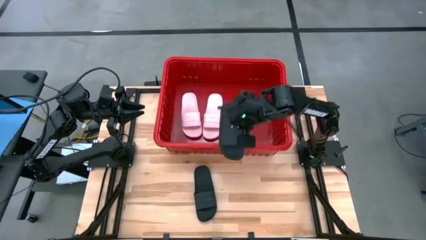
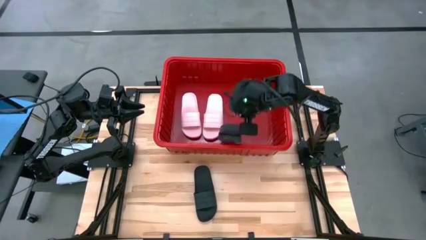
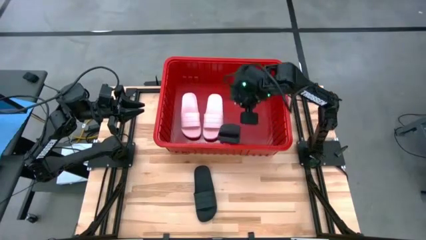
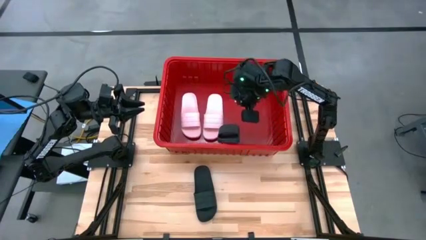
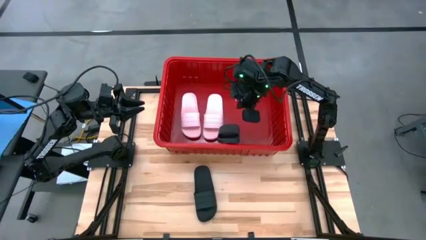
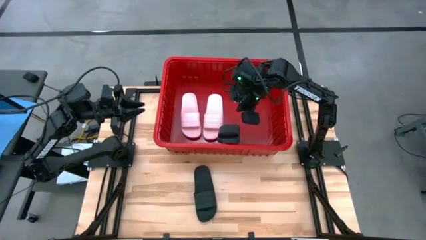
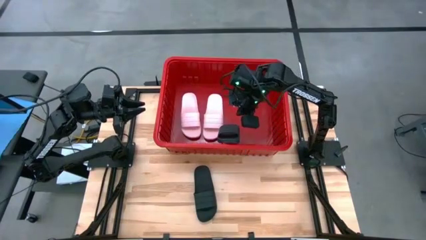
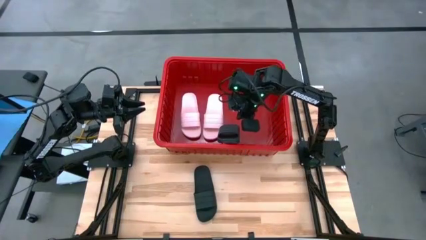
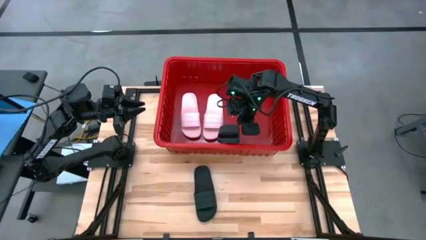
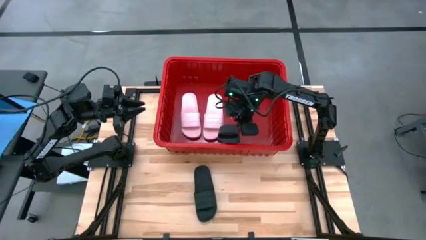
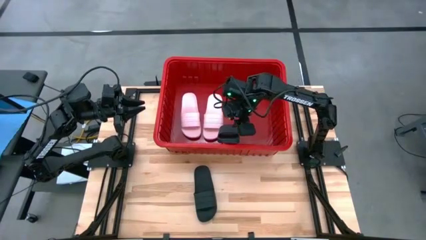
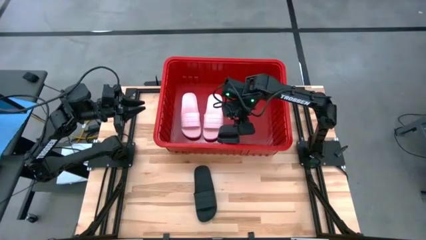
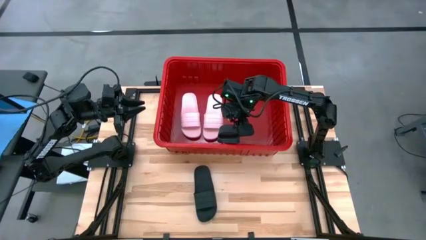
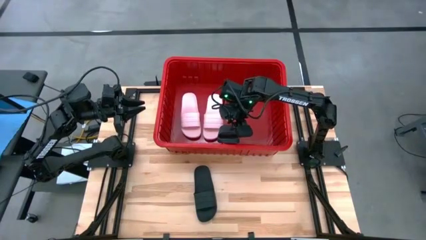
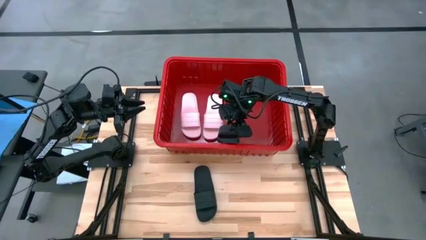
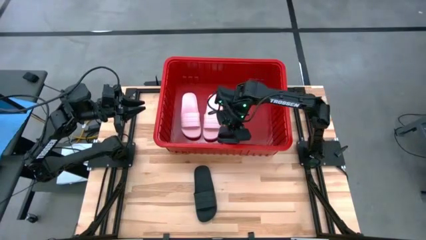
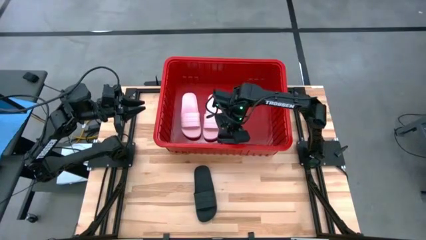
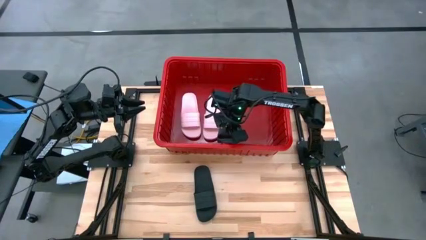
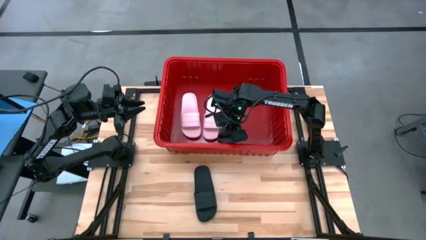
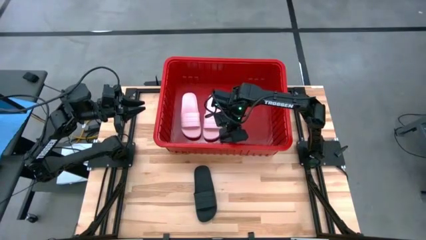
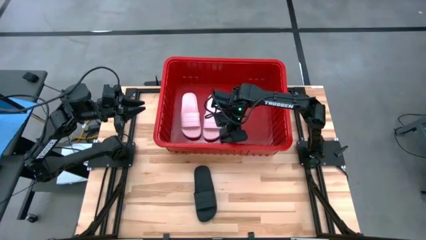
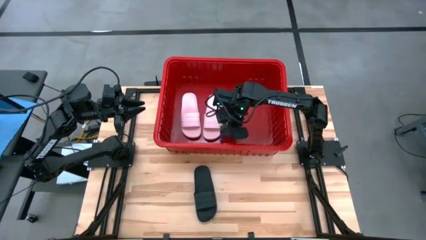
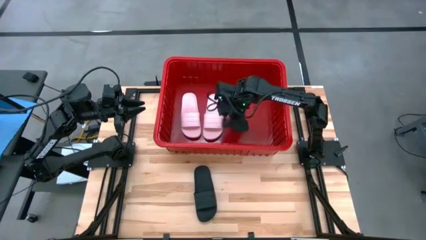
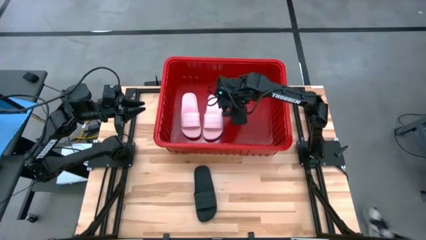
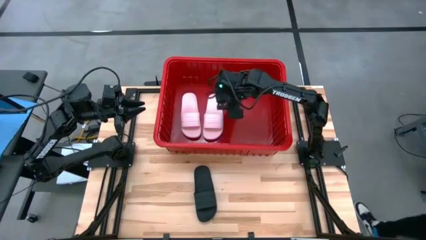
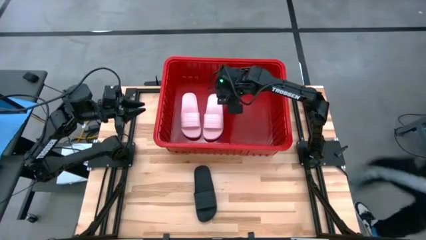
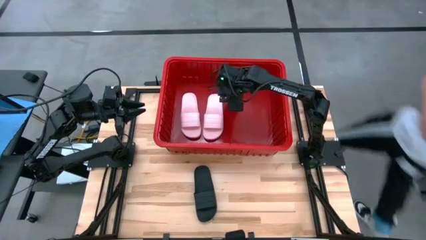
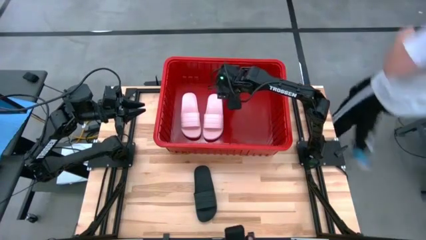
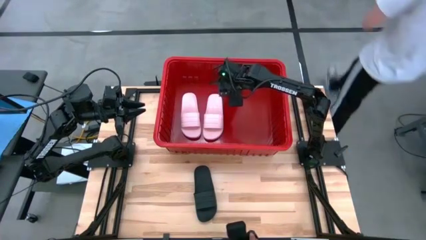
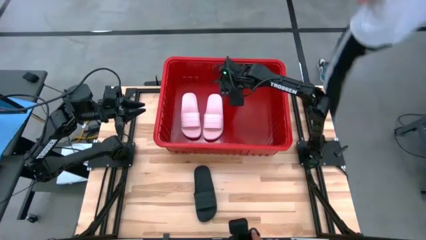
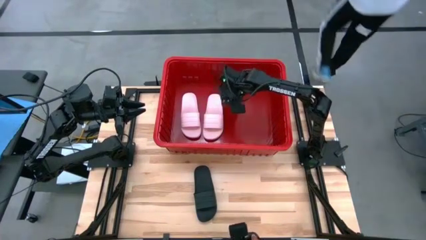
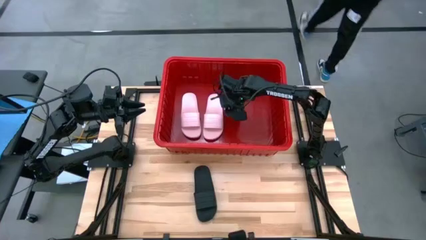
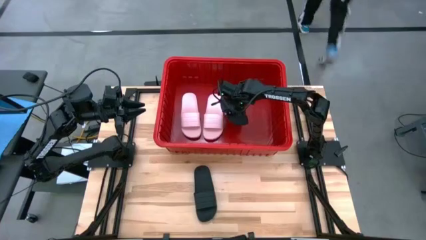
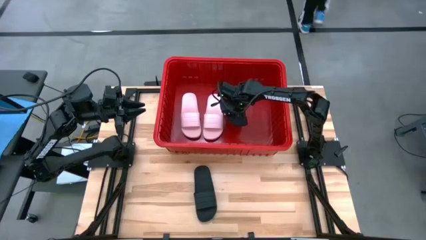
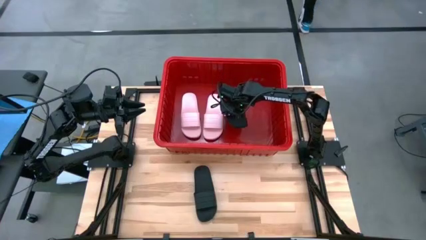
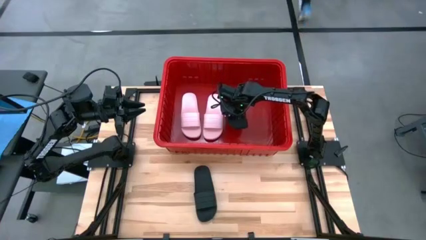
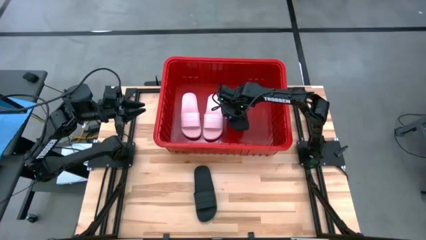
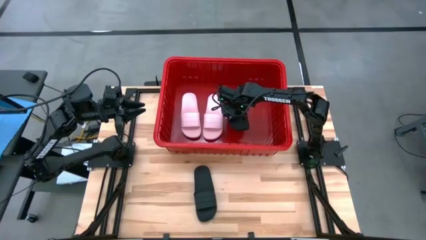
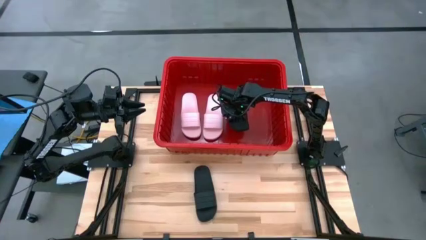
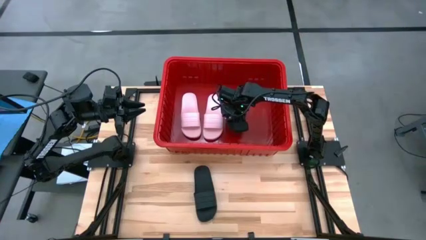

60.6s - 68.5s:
Task: Pick and place slides into bin
Put the right black slide into the red container

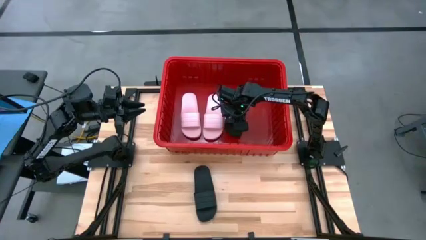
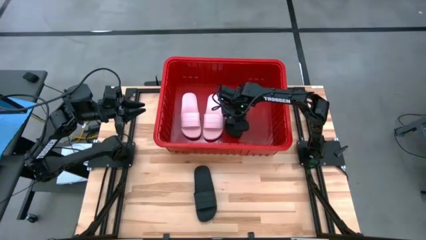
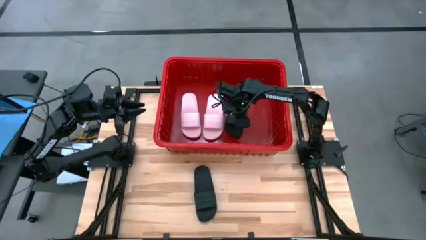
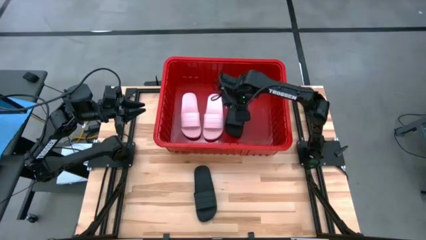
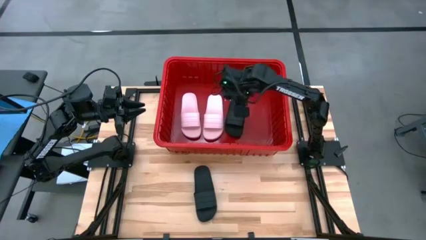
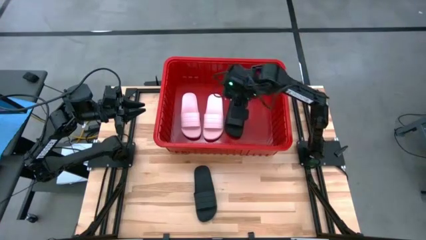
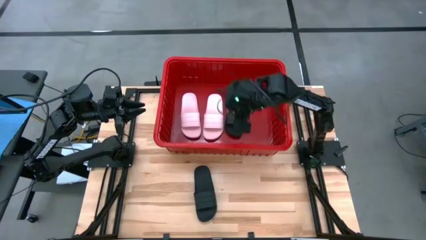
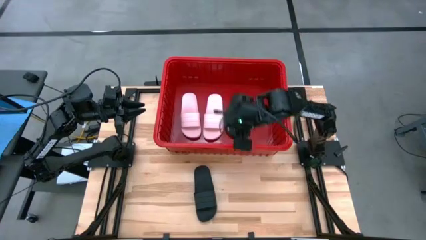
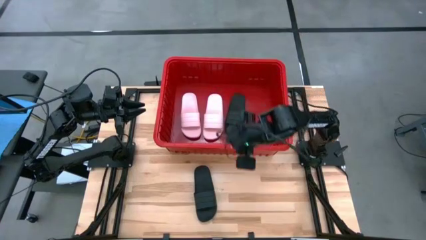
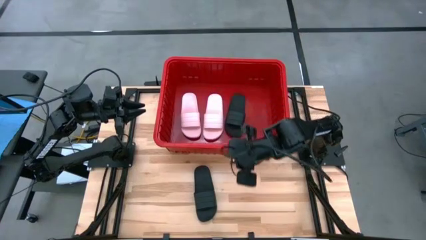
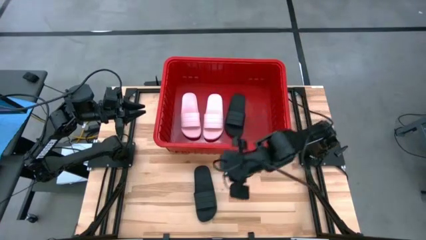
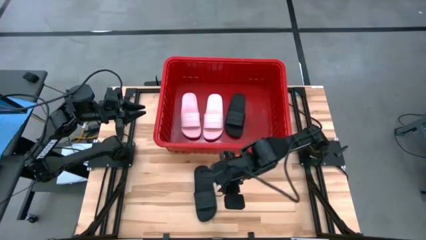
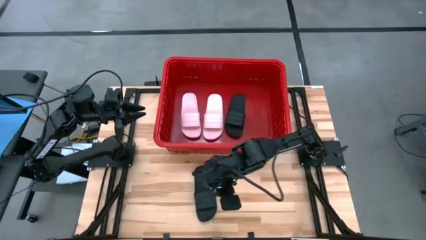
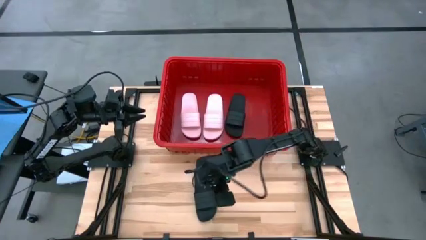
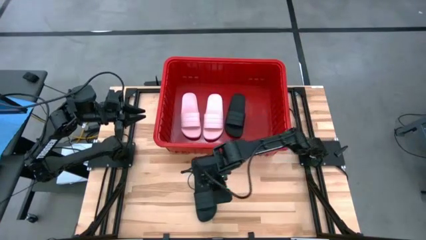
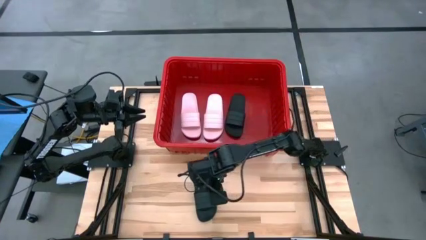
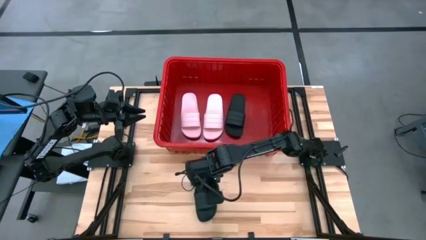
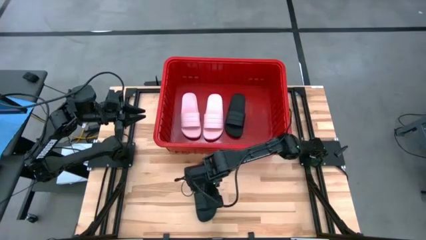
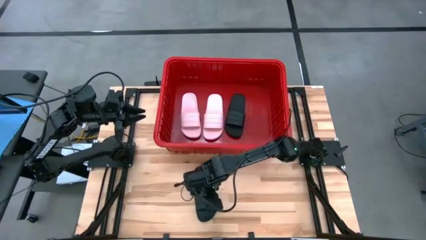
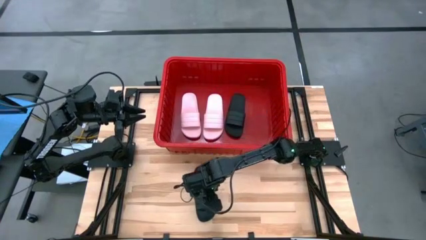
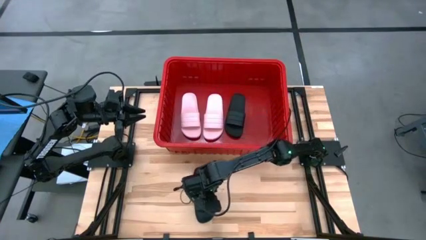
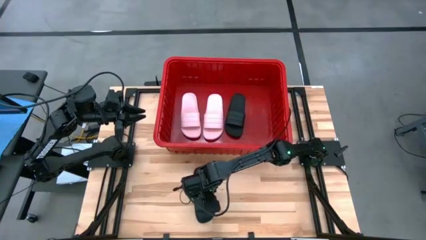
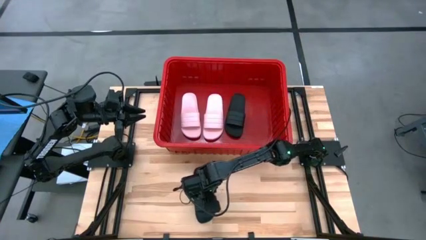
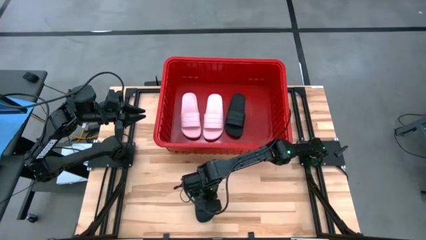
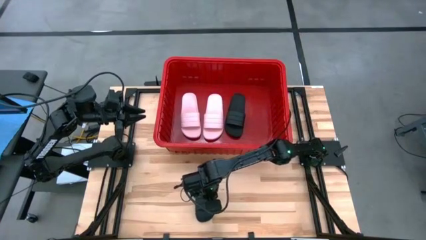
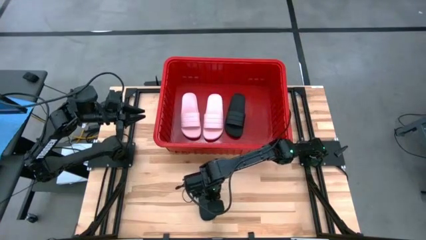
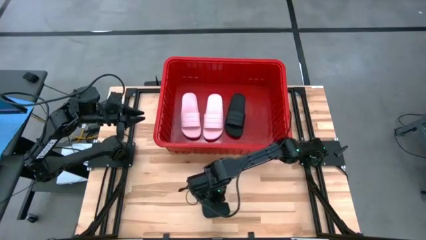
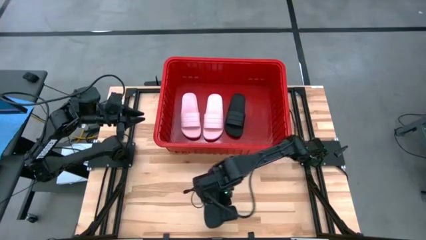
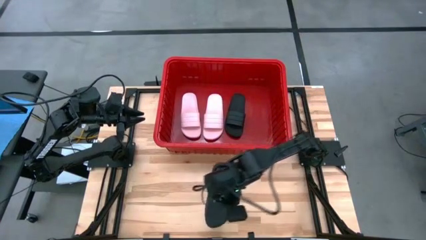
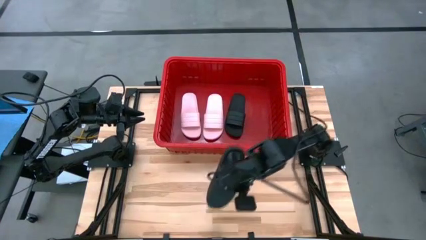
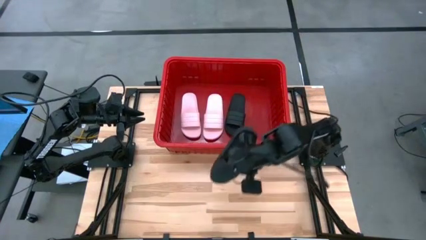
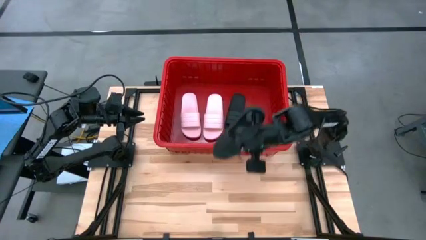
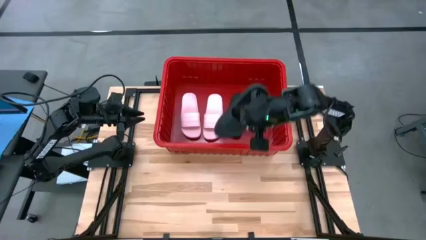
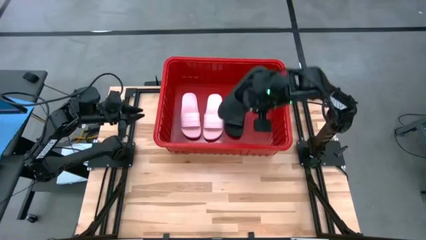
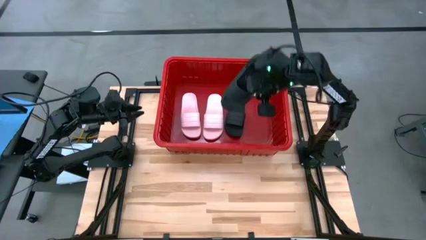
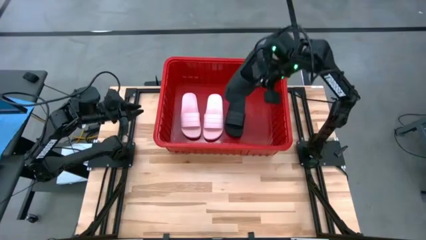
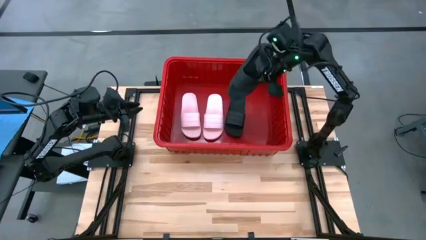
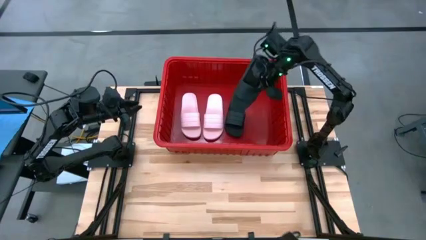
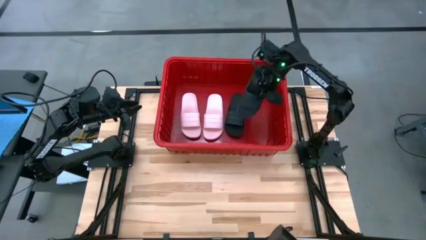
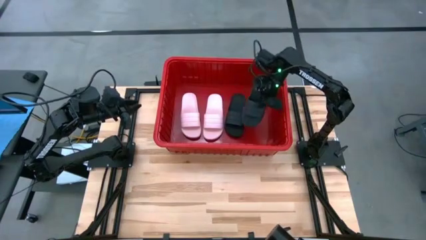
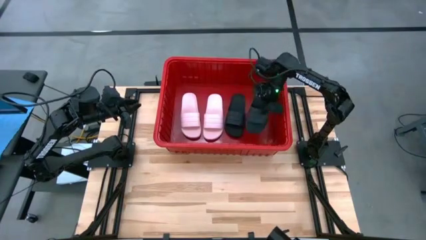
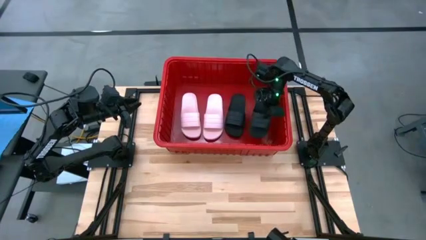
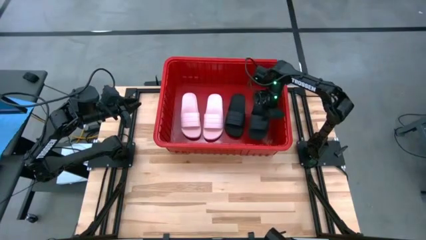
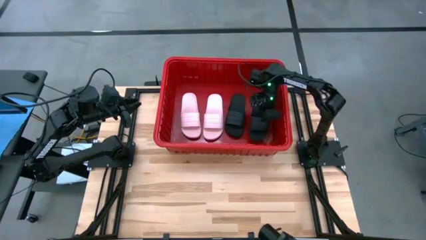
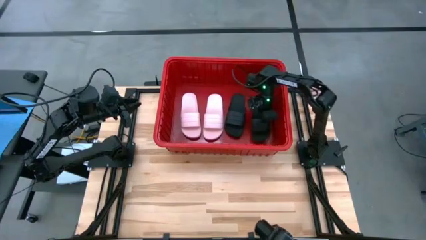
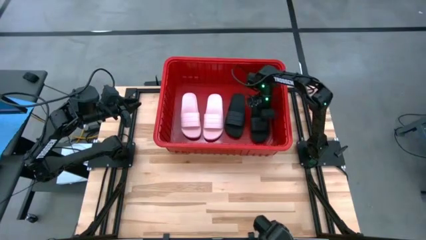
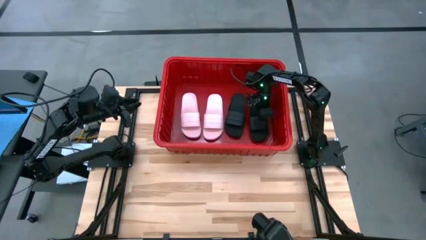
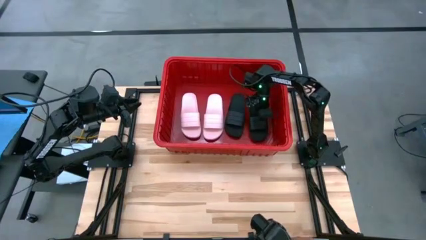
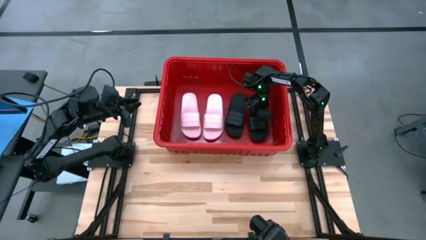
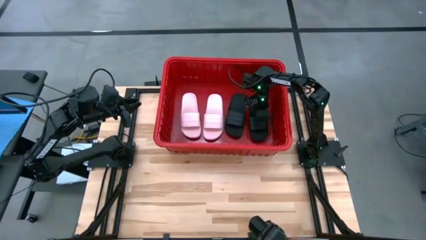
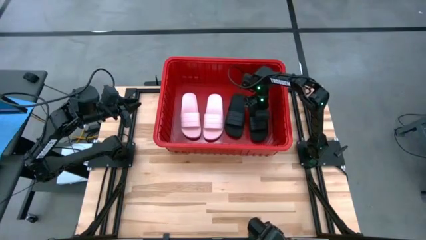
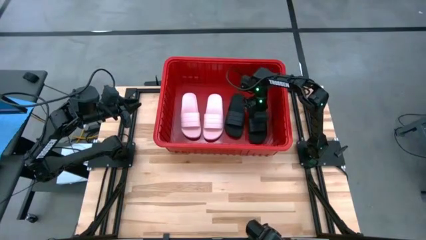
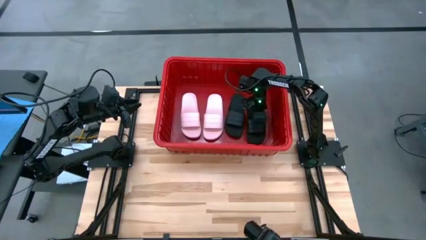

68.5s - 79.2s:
Put the black slide into the red container
